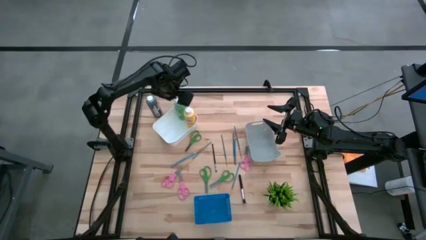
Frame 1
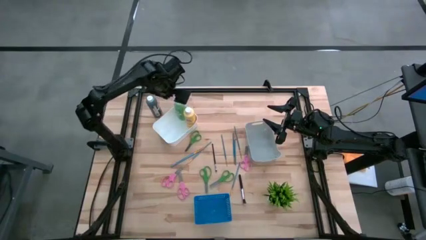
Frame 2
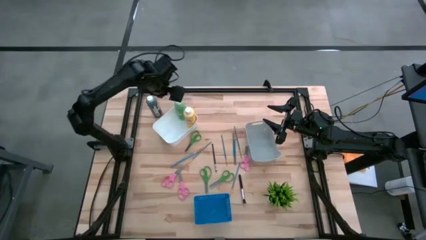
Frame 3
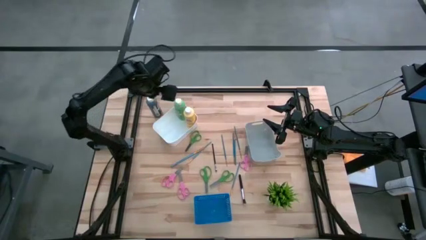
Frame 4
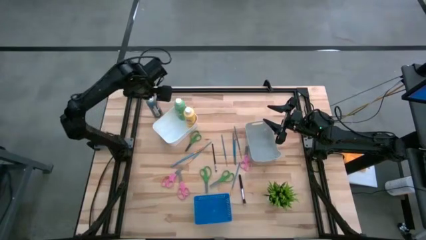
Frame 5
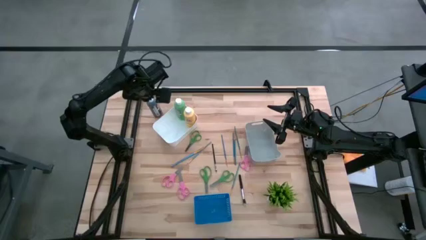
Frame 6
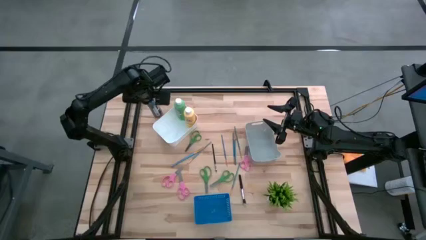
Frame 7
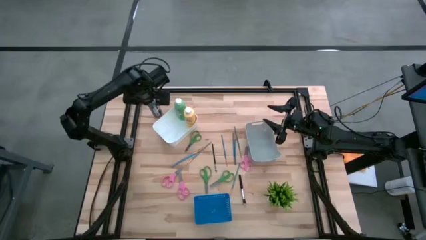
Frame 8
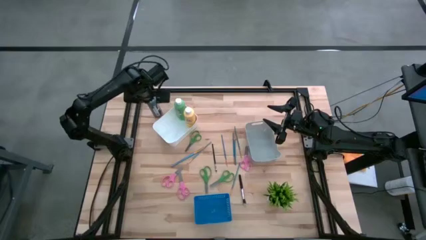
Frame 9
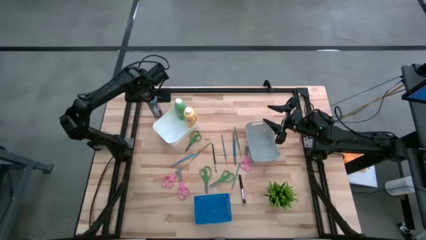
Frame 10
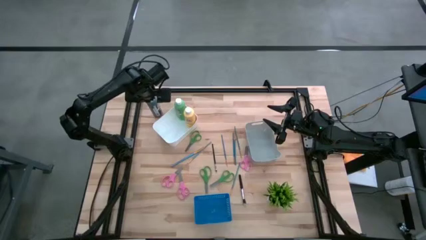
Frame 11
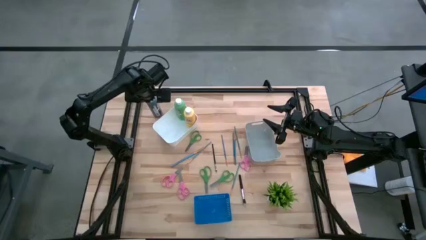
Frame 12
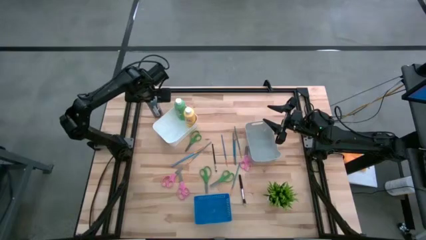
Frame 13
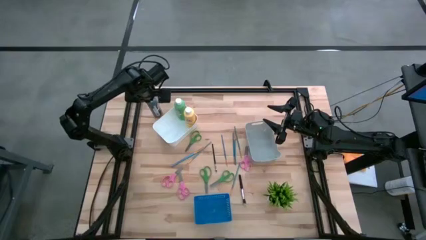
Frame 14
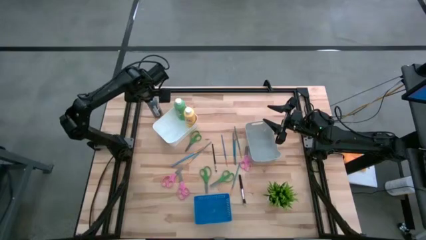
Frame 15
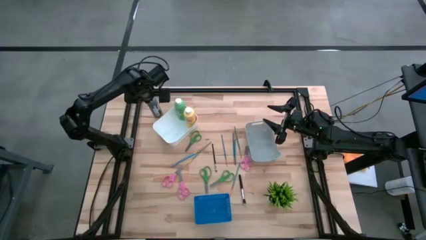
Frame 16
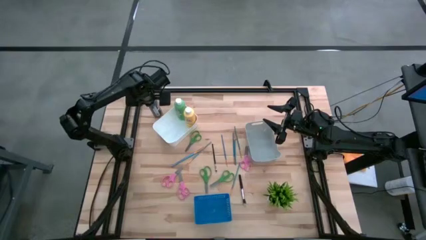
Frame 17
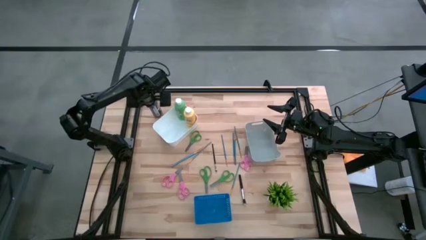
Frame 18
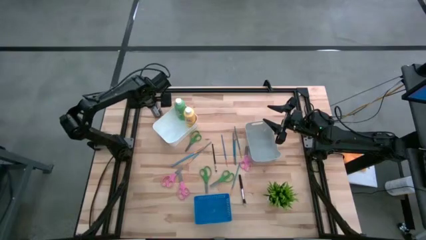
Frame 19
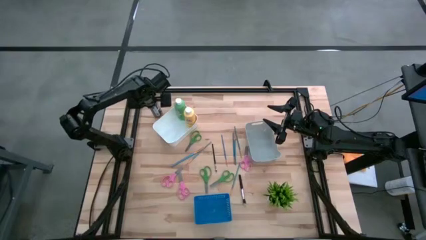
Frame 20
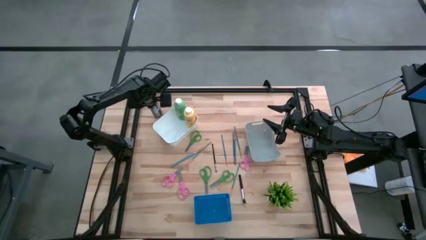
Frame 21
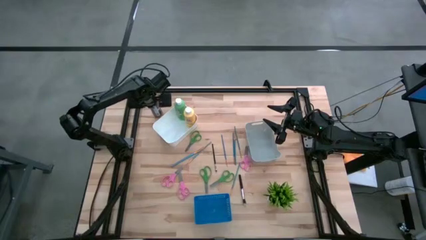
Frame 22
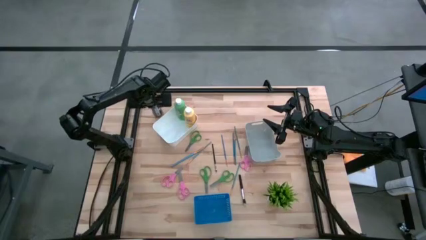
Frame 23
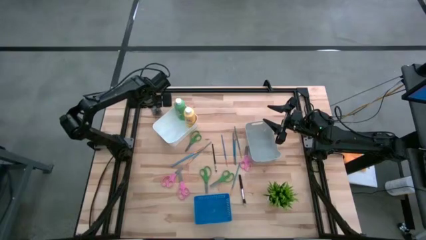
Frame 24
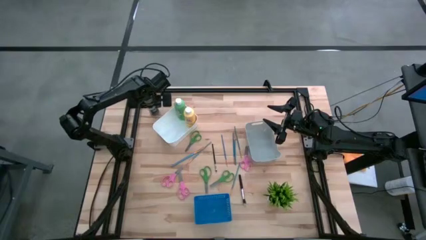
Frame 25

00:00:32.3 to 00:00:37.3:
Task: Pick & Place Paint Supplies
Put the black paint bottle into the white bin

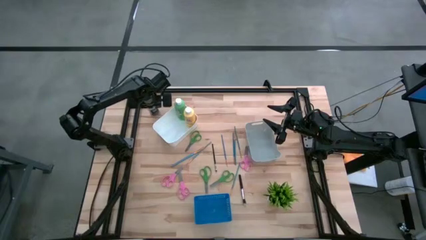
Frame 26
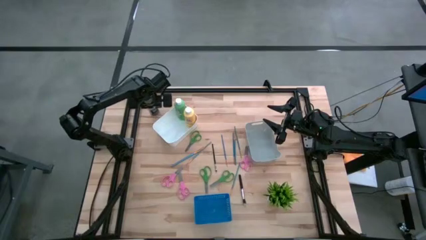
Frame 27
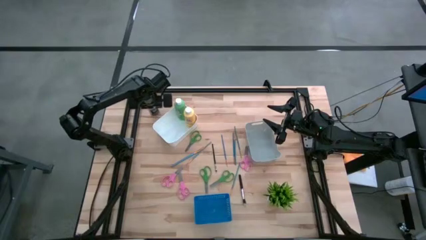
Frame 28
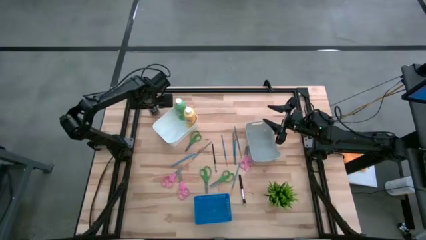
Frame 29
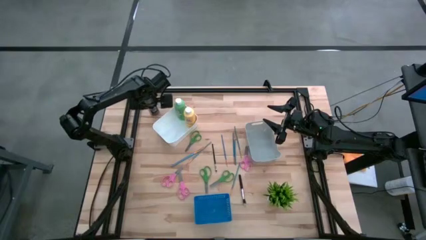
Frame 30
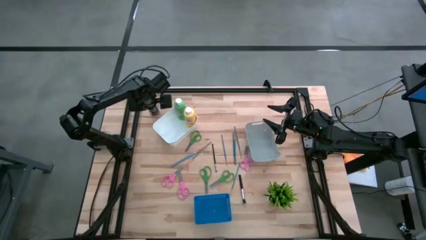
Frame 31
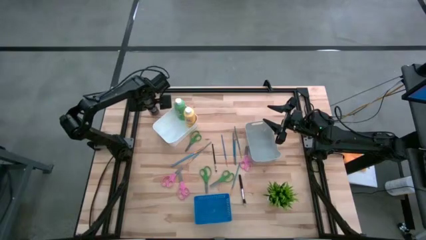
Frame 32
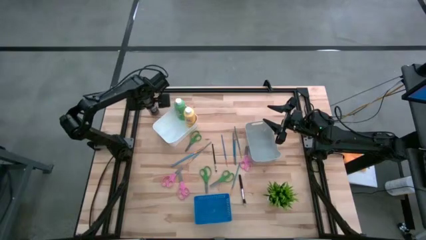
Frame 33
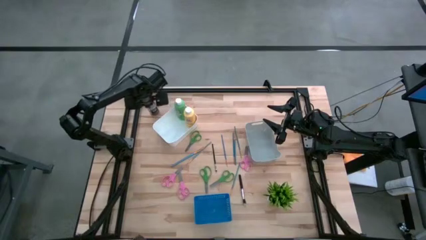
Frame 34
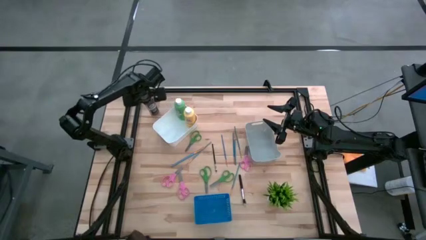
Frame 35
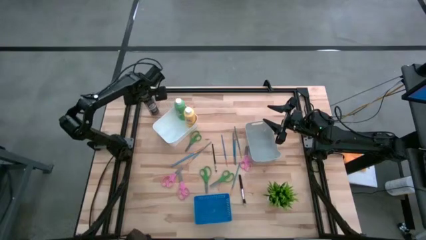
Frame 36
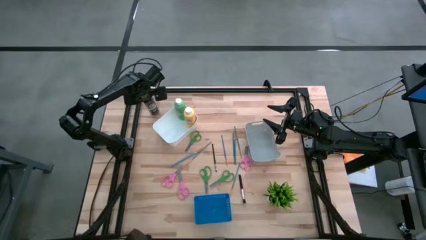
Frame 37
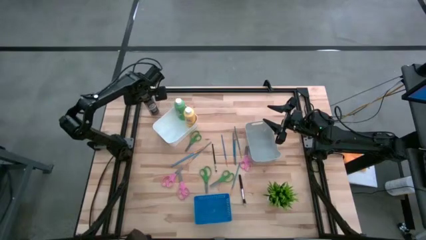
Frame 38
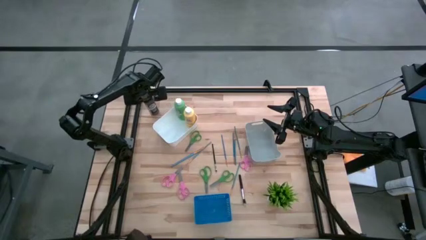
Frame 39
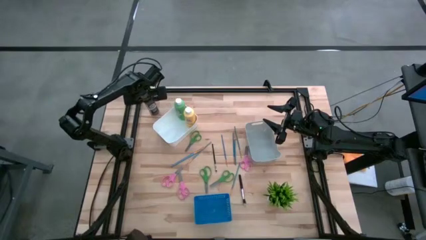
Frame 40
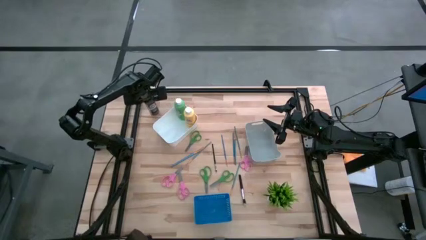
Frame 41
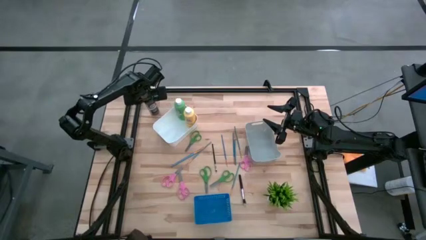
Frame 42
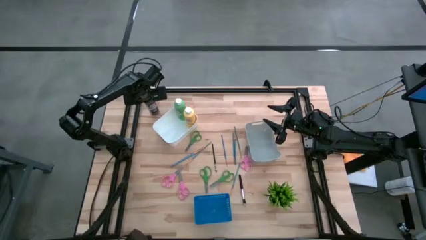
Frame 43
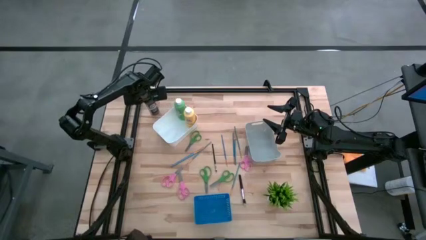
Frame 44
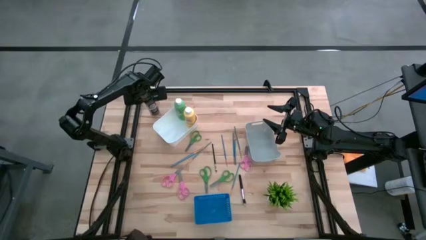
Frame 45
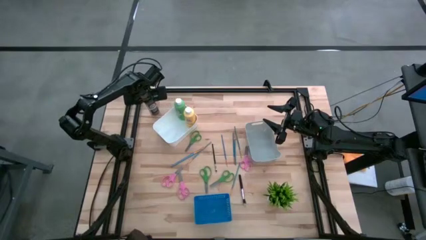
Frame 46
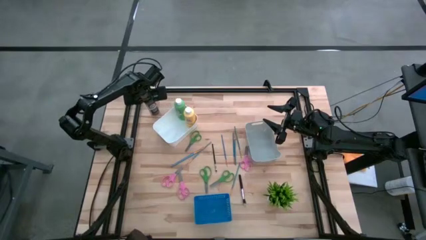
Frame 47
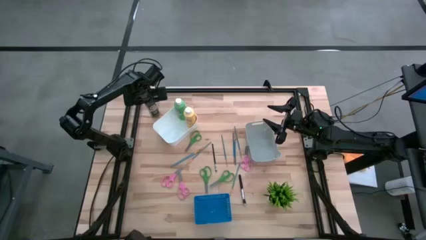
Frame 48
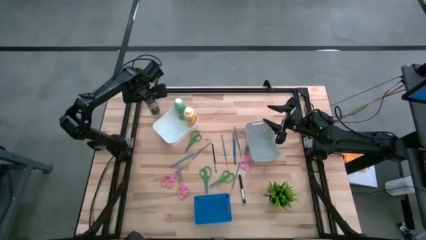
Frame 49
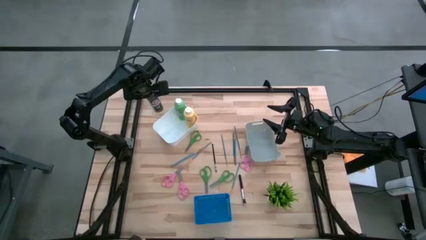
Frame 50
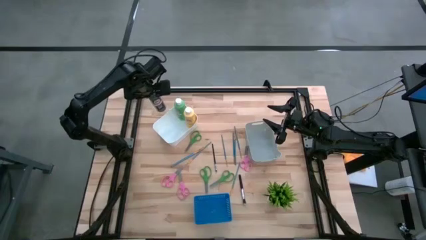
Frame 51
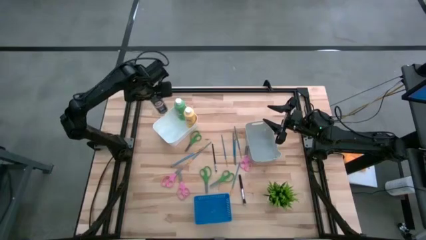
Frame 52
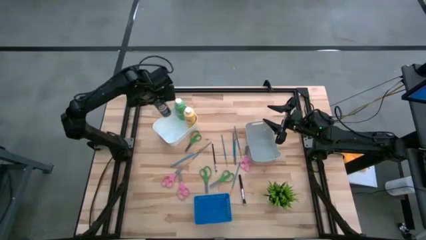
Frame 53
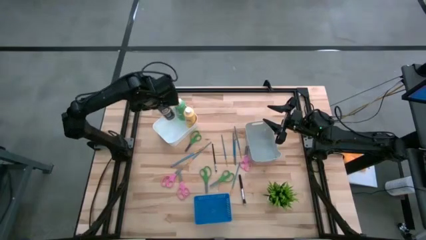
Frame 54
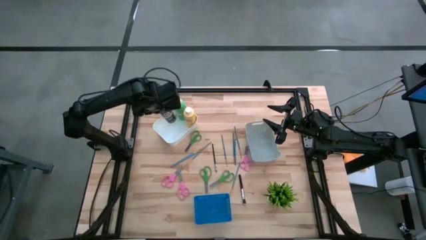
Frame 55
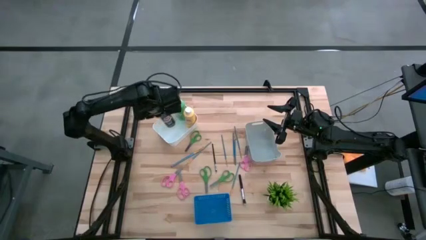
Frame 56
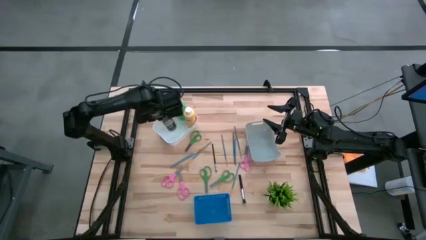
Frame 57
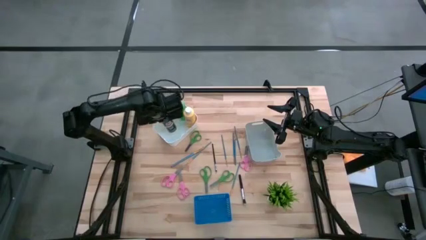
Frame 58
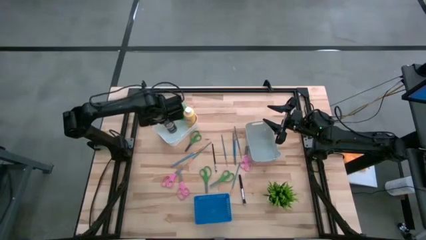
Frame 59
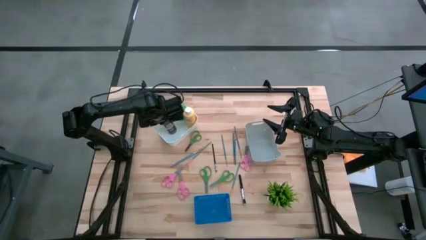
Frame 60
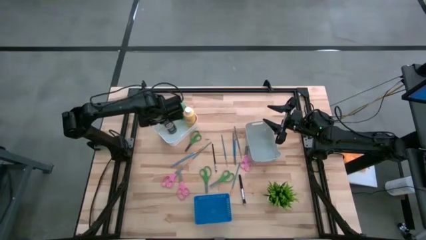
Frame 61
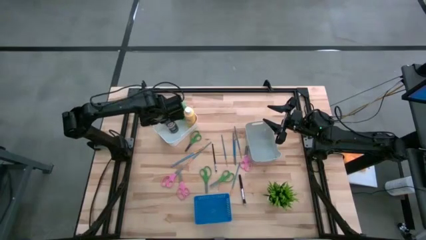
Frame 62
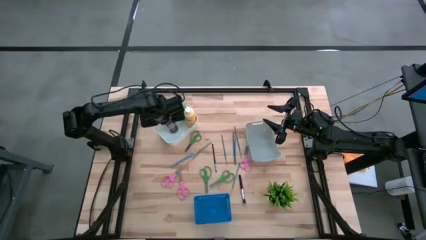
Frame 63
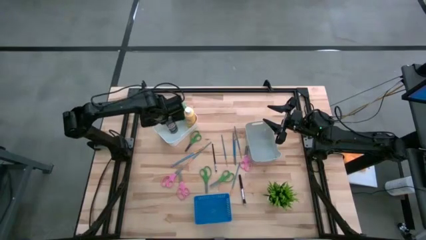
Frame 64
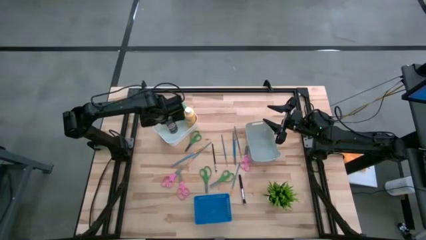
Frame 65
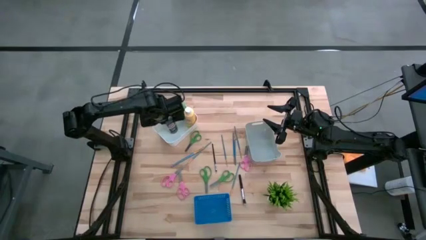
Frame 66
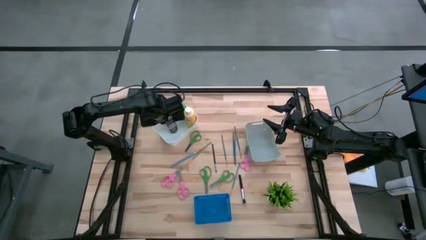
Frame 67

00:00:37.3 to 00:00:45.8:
Put the black paint bottle into the white bin
